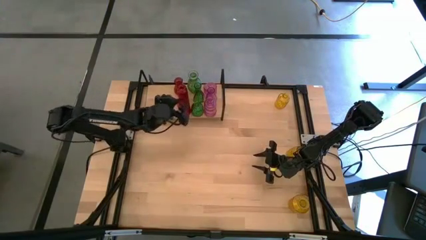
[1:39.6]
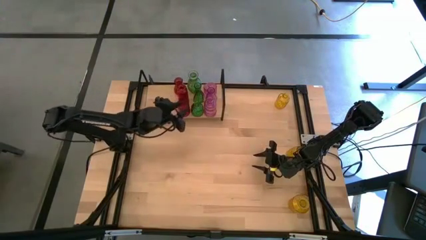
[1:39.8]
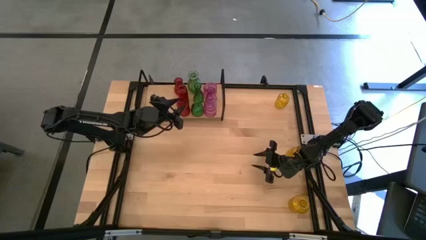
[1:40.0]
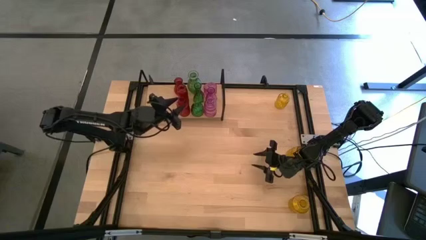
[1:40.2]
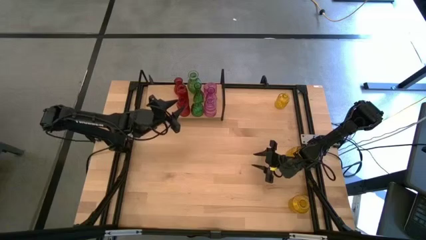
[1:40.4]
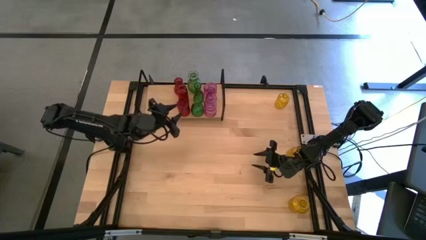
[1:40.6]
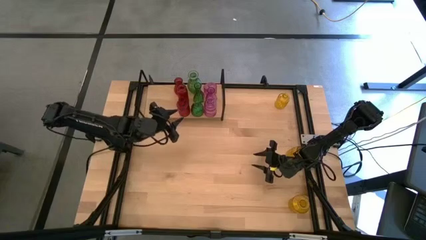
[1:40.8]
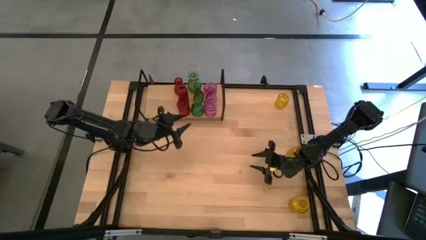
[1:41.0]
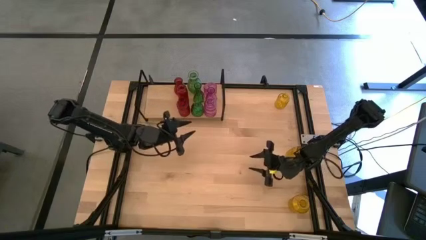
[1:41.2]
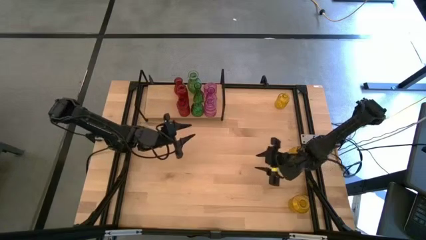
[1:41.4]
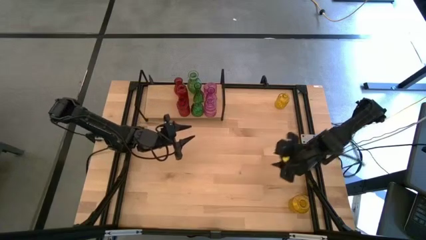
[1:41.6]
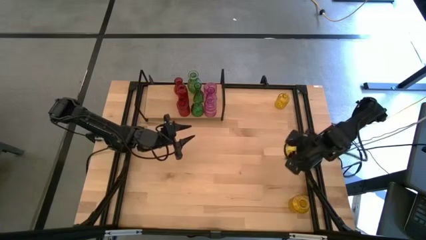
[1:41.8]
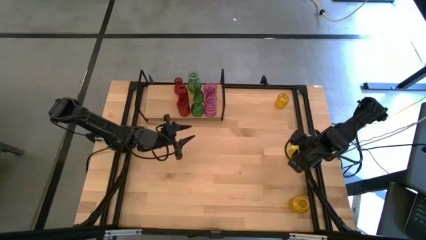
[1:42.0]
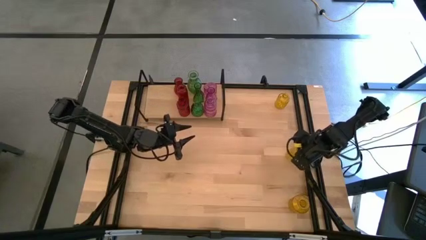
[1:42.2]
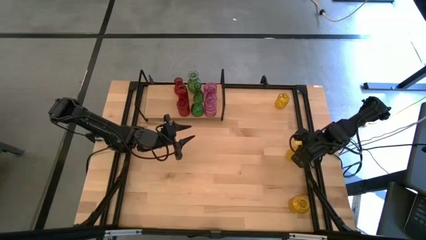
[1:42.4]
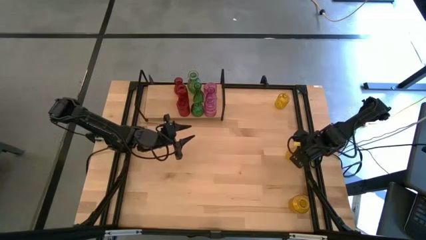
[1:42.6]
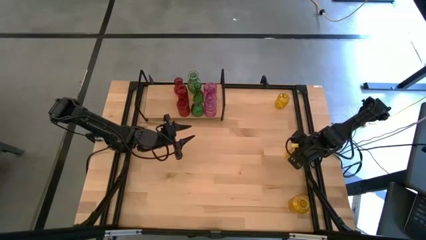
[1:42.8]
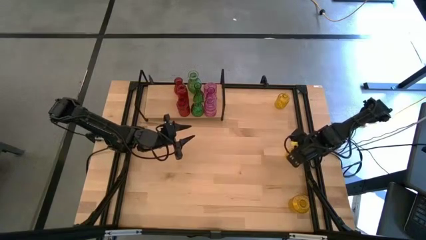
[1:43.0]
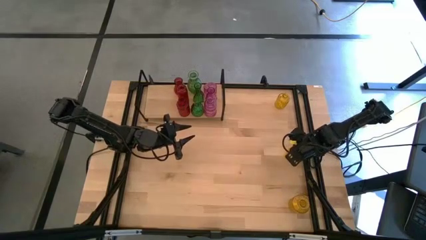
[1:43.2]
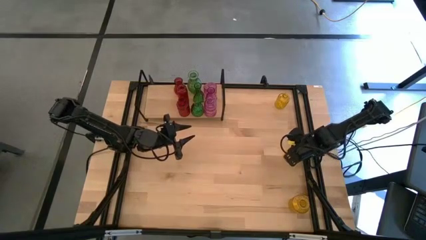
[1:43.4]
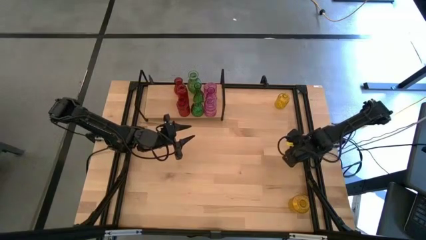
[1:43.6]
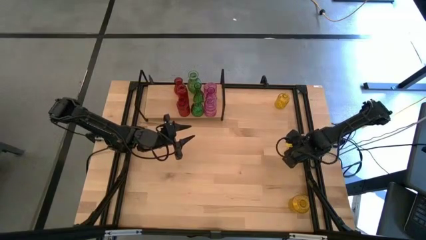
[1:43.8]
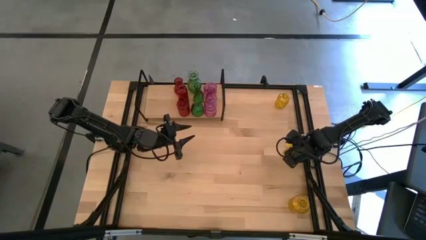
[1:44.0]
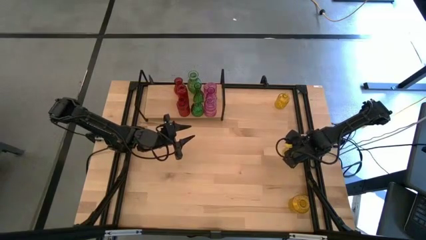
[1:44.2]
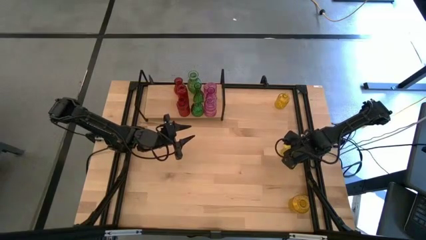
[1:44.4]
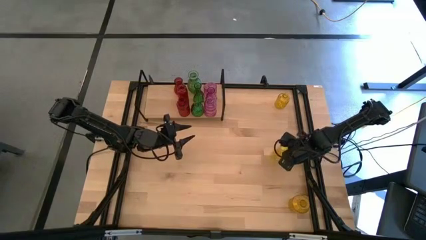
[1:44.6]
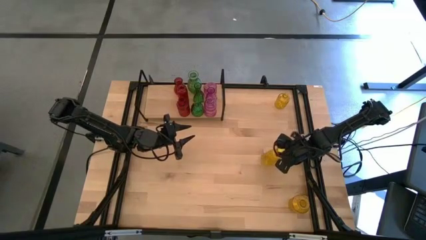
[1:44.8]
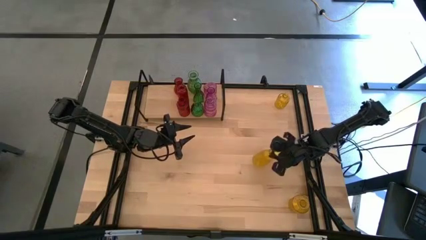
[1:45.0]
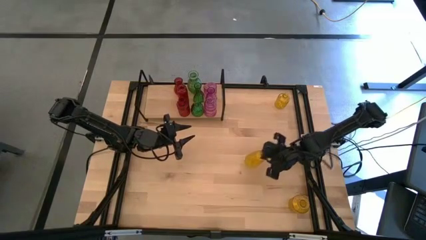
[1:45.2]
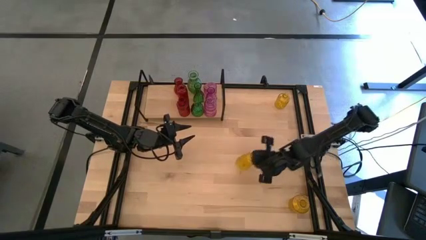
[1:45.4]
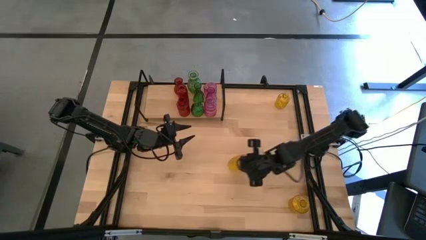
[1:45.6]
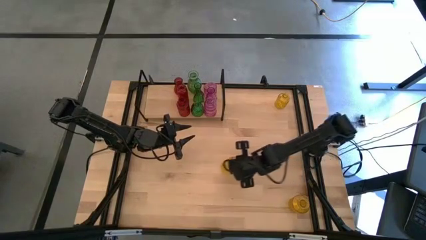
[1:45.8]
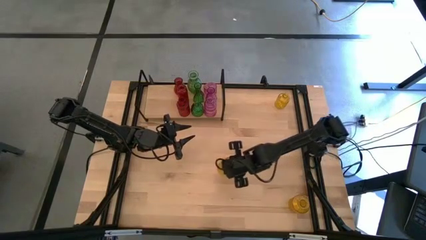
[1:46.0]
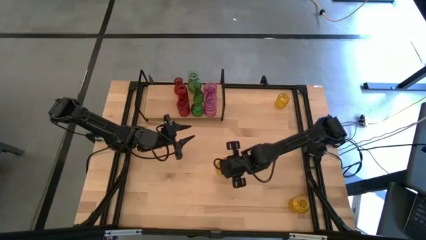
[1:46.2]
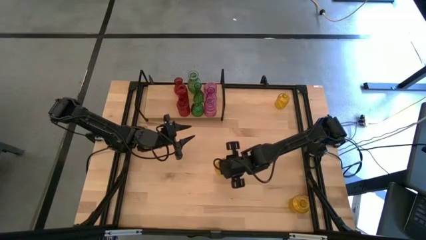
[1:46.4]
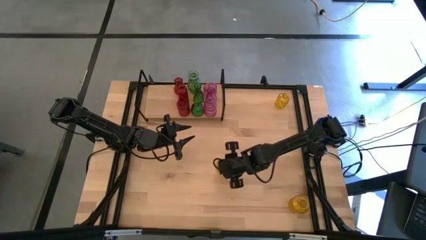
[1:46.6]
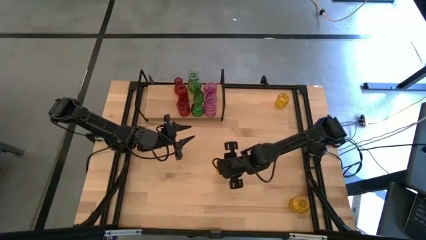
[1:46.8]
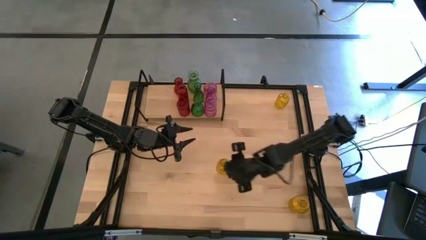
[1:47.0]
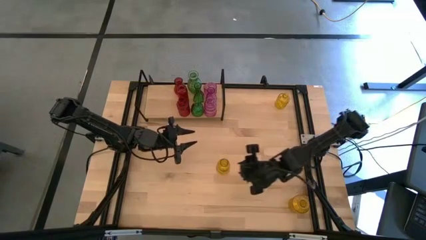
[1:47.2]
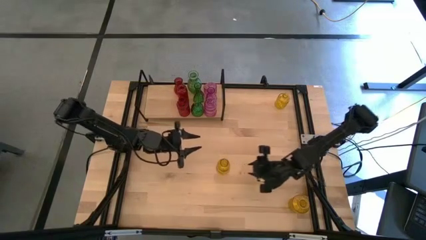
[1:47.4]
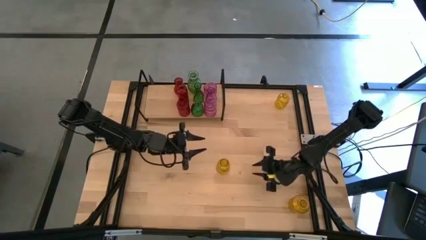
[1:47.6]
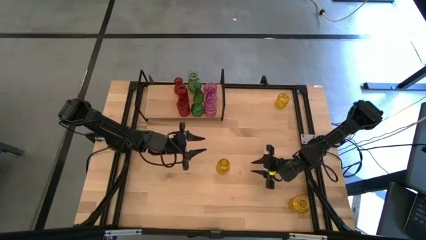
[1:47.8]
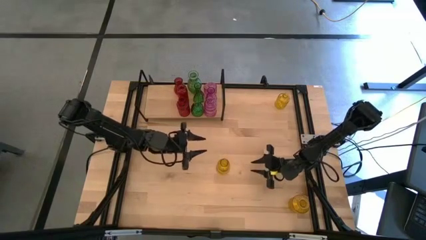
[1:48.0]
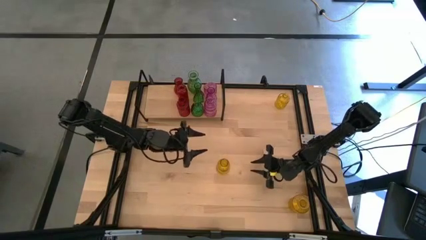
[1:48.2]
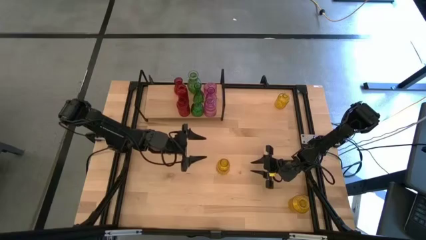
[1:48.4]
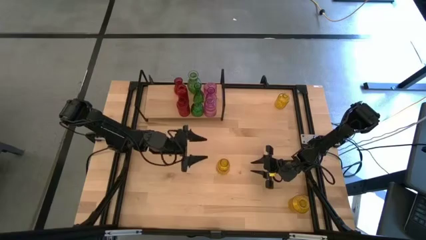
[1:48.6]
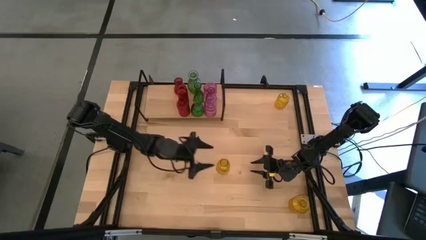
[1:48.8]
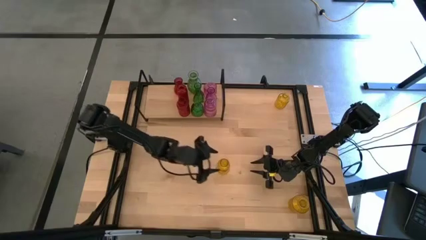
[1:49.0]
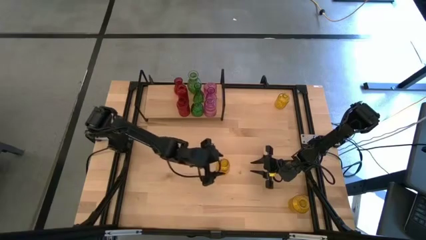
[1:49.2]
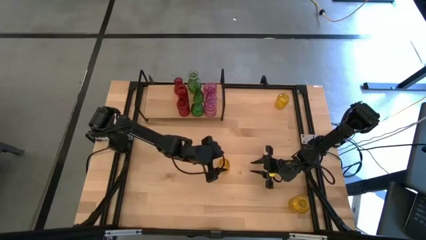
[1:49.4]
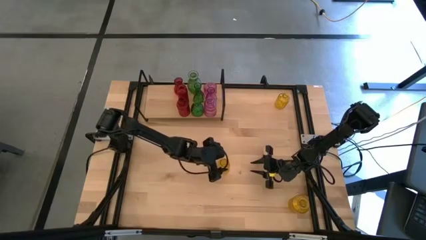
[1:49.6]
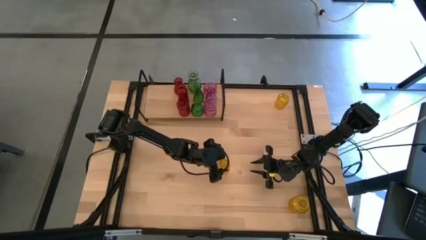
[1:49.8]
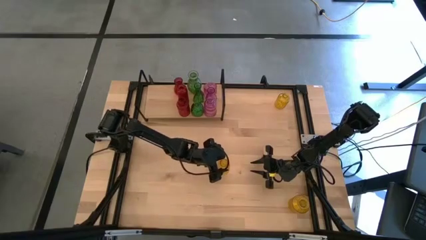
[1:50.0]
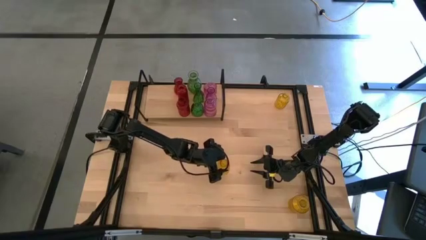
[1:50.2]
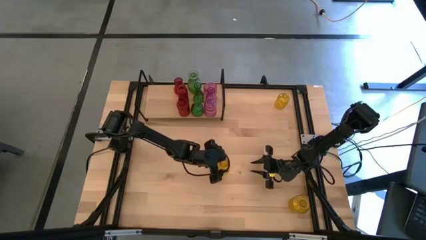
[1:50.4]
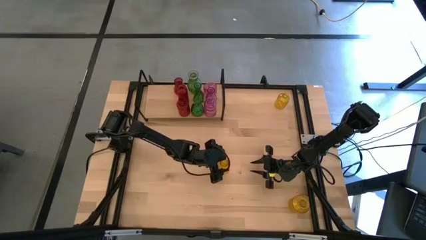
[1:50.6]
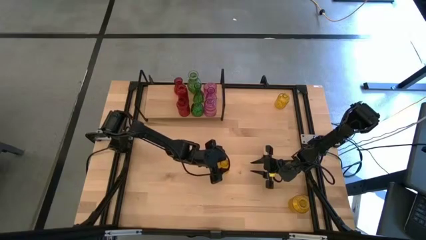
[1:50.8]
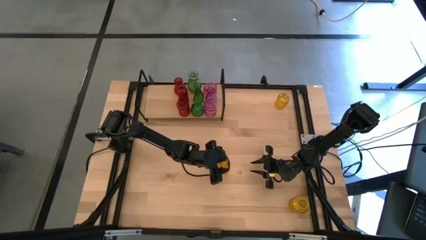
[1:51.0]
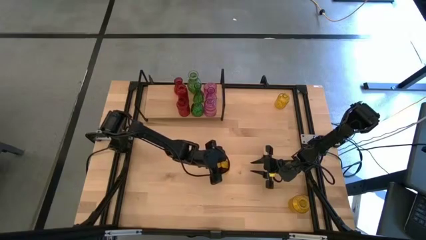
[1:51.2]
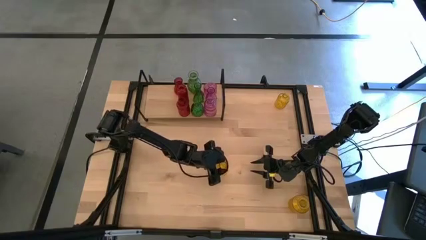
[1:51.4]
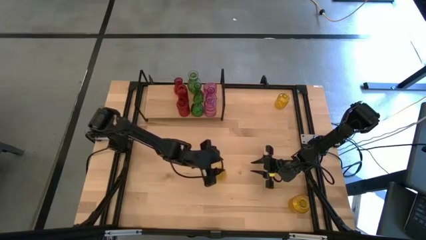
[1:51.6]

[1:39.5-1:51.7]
Task: sort vases onto shelf
Put the middle yellow vase on the shelf

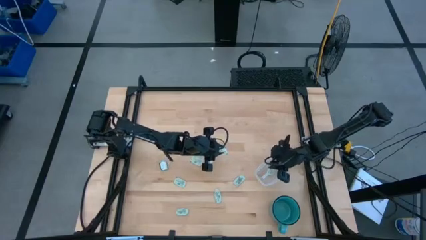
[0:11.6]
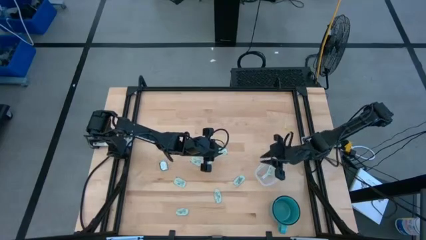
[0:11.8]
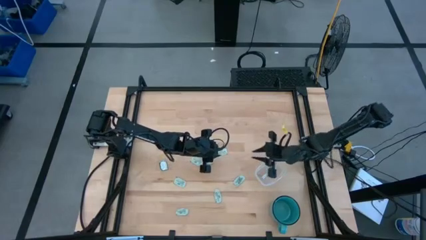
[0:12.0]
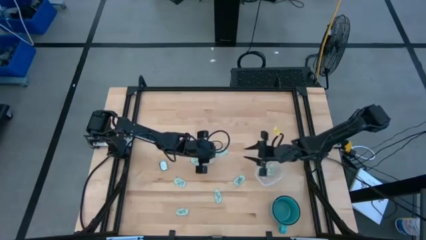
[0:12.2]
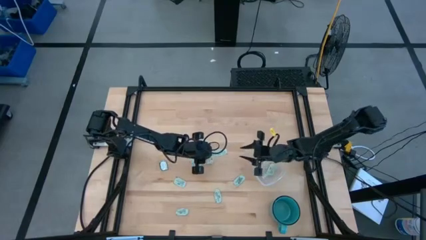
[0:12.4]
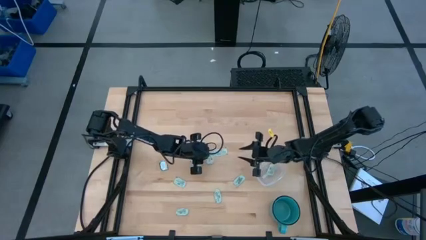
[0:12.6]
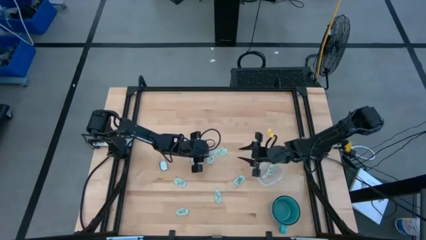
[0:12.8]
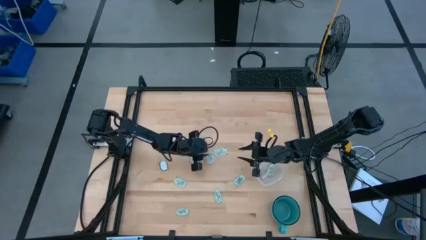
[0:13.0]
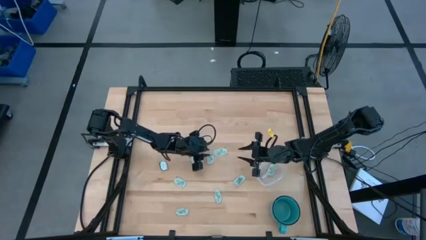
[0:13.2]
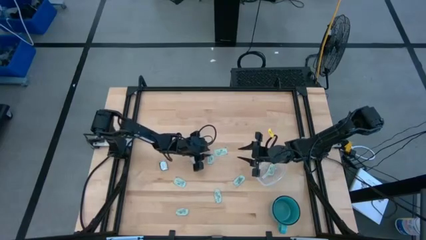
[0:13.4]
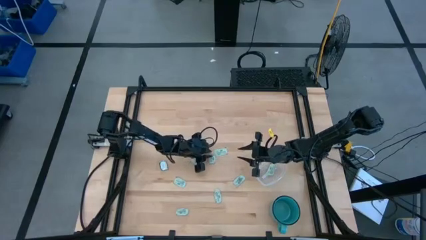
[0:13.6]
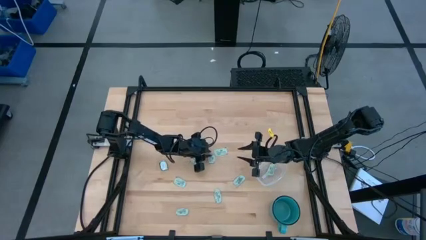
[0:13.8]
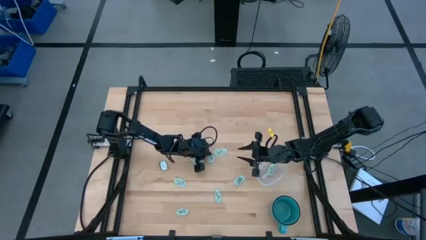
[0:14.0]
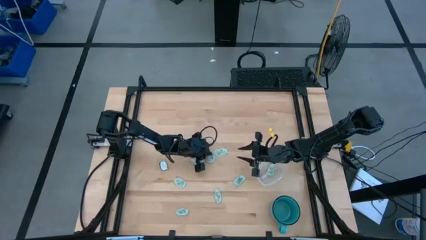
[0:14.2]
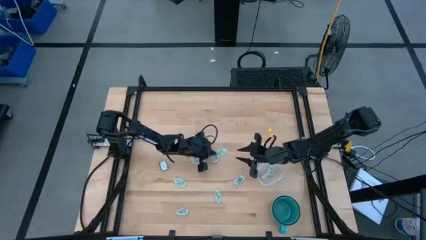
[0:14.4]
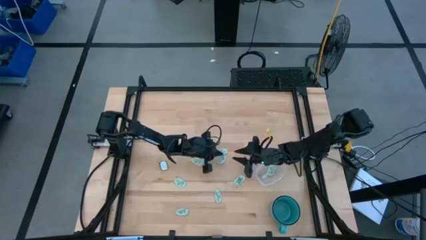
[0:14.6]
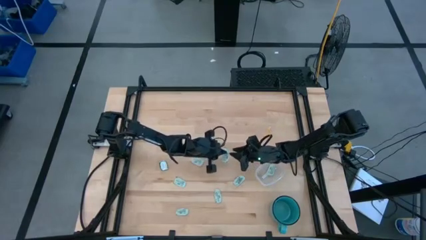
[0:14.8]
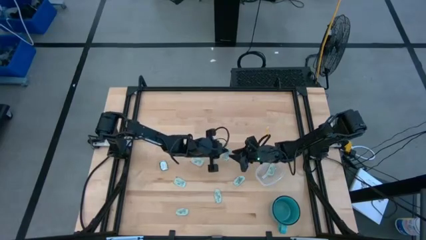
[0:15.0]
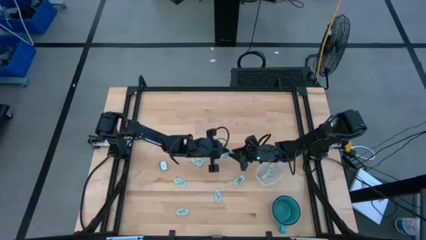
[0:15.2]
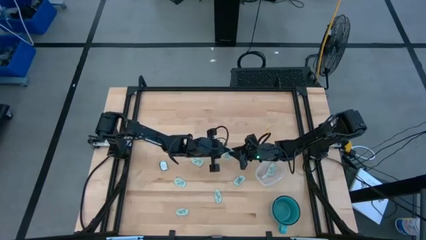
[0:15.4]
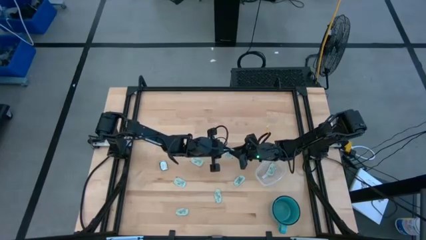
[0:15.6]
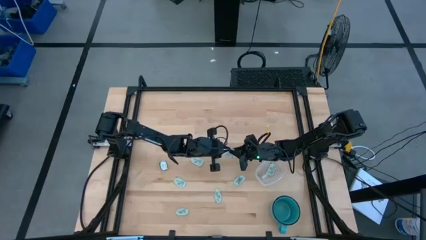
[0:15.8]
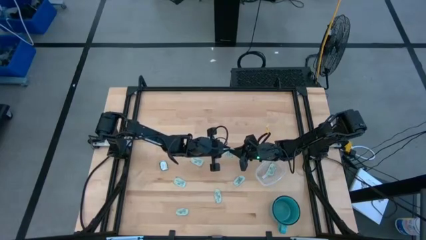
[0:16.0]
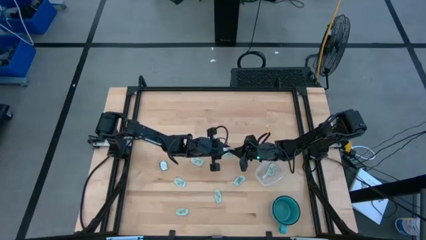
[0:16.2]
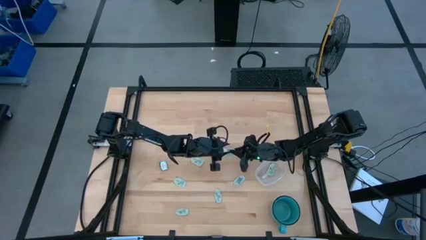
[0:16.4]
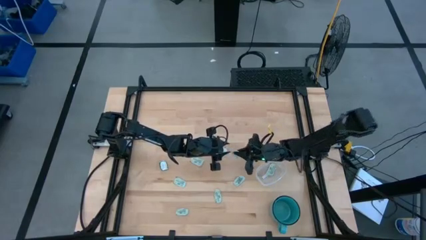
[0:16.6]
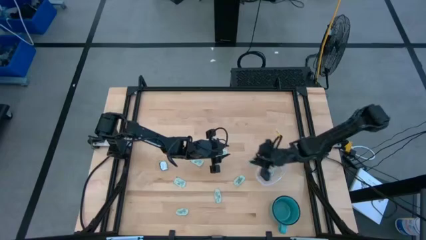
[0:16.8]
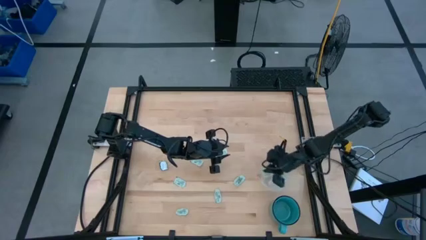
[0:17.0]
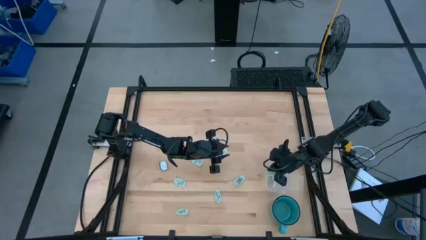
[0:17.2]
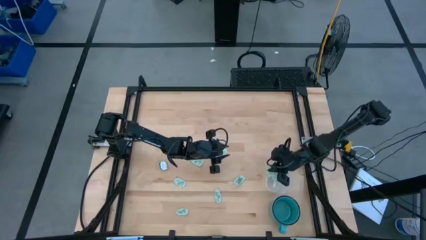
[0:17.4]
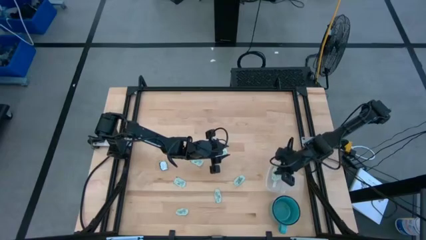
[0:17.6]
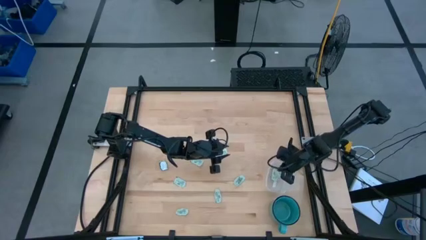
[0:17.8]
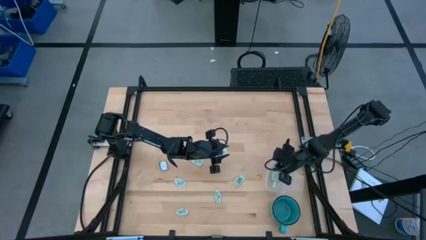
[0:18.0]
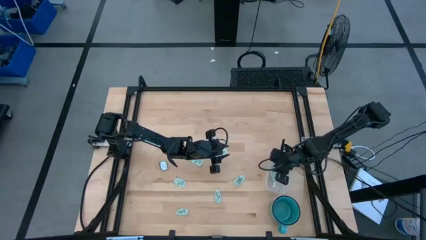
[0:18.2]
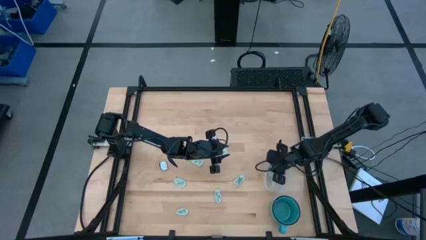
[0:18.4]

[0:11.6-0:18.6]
Task: Pick and place Stevia / Truvia into bins
Put the stevia packet into the bin
